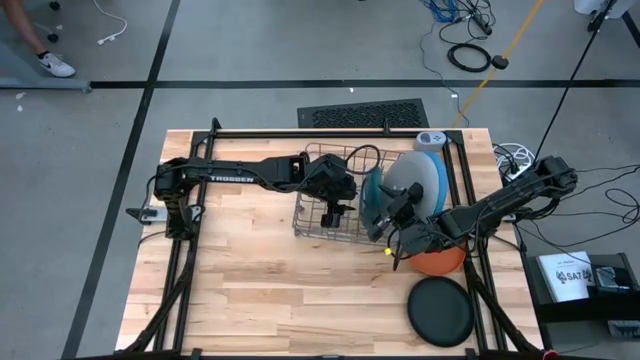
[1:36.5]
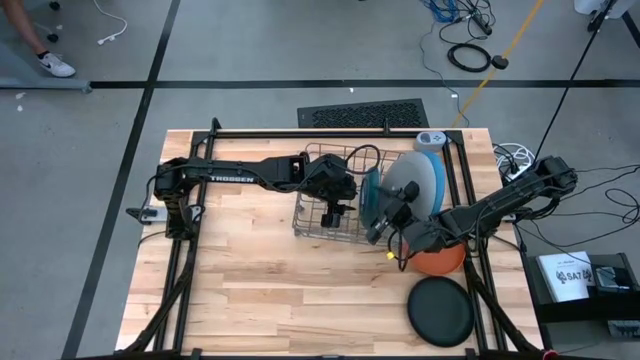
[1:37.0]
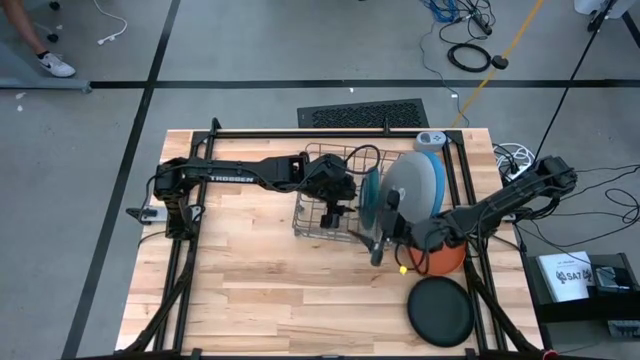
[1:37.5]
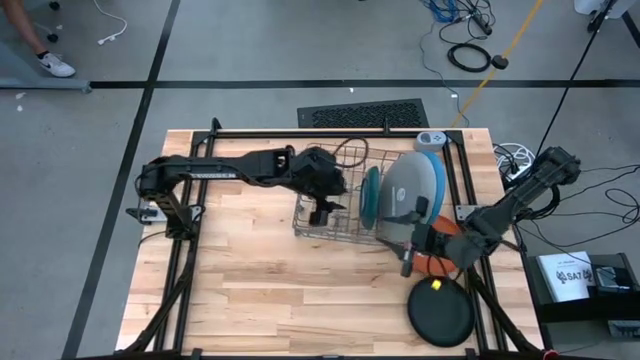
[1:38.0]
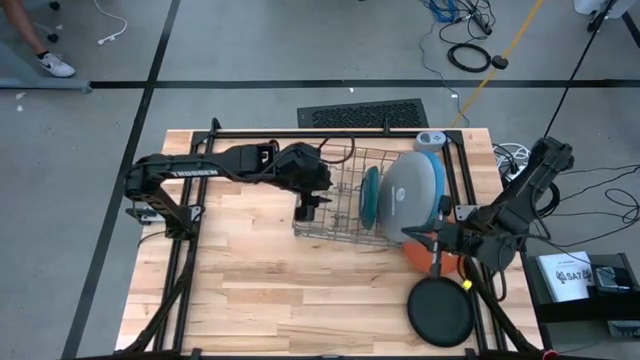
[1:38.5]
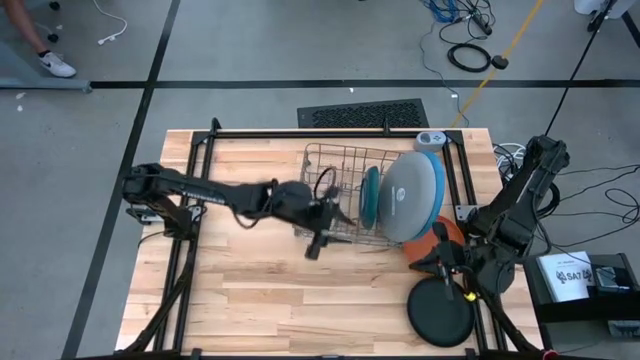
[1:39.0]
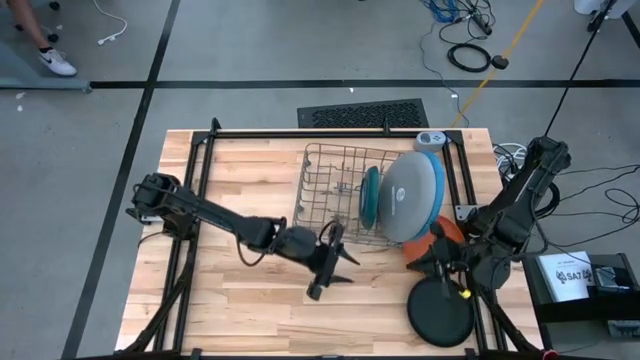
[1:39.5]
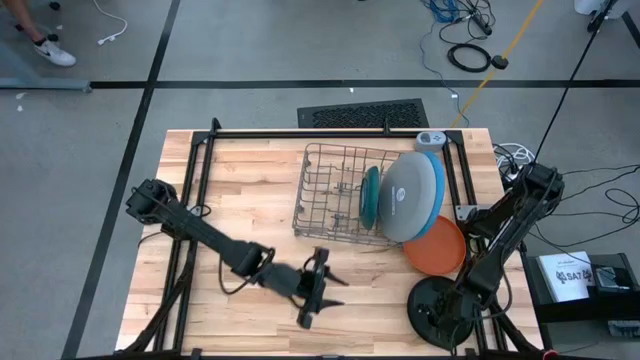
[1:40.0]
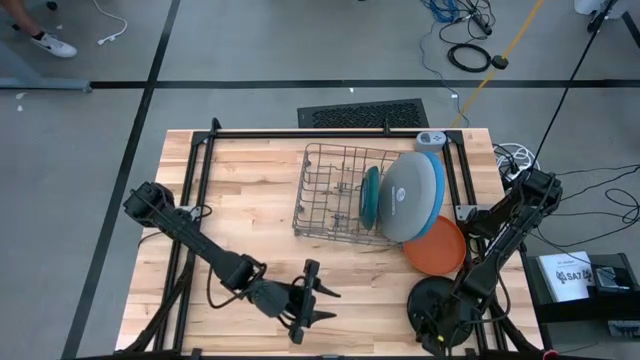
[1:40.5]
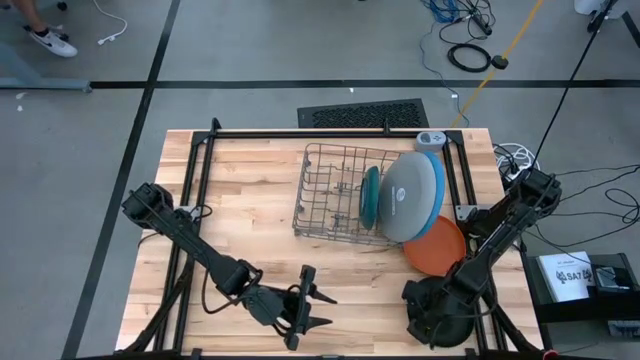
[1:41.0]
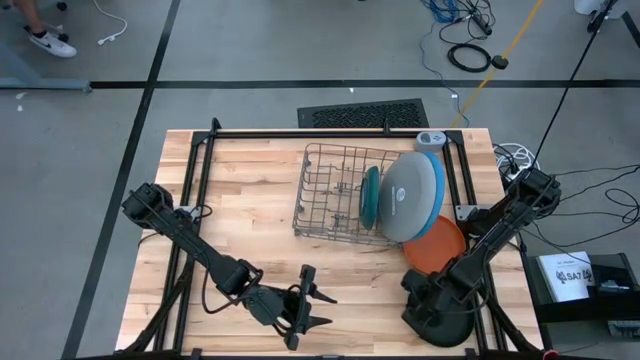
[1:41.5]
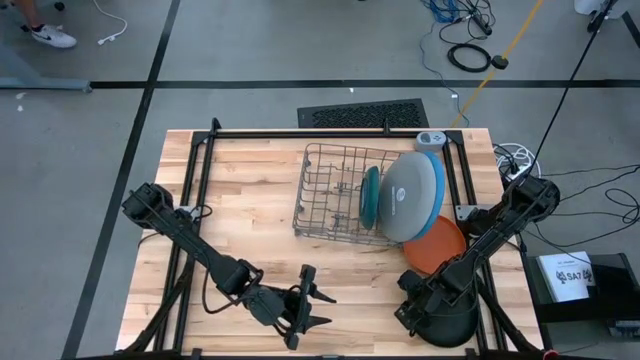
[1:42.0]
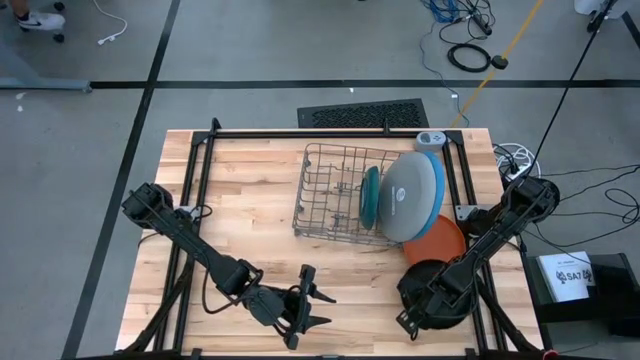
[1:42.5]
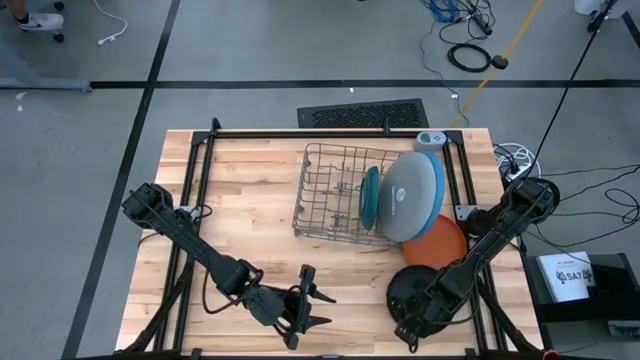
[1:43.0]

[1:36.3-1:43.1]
Task: Sort dishes
Put the black plate into the dish rack

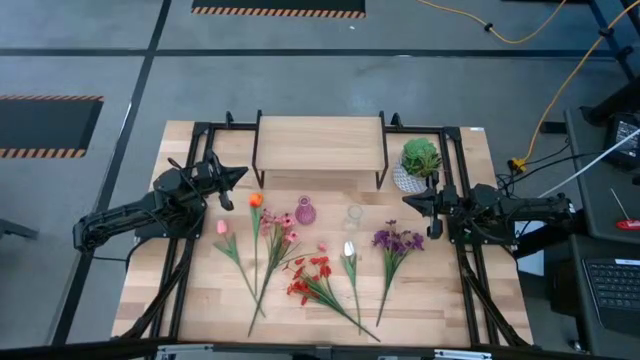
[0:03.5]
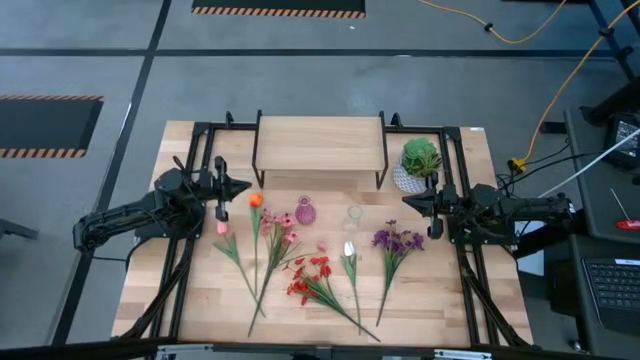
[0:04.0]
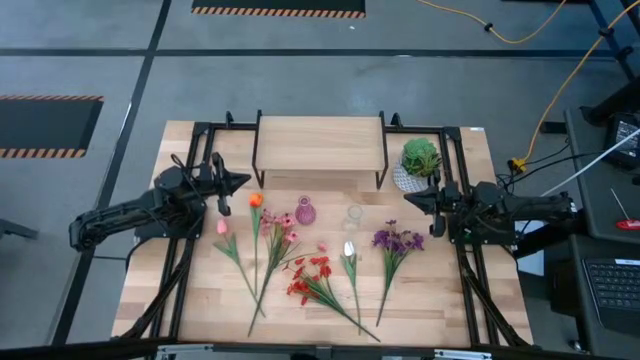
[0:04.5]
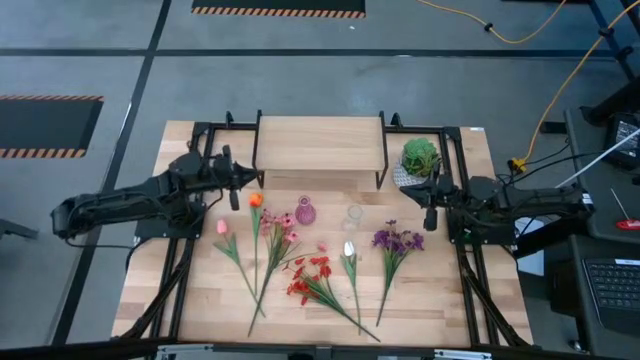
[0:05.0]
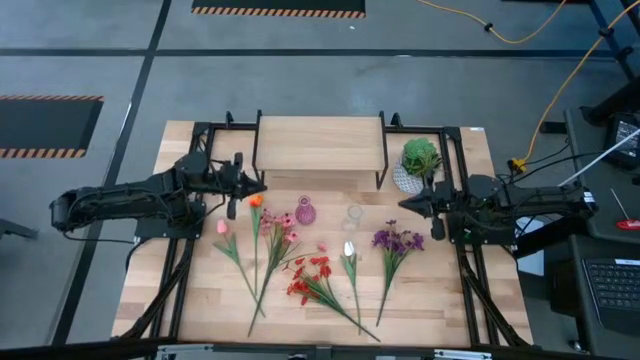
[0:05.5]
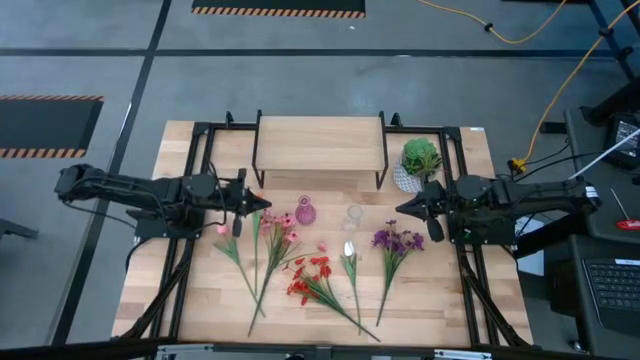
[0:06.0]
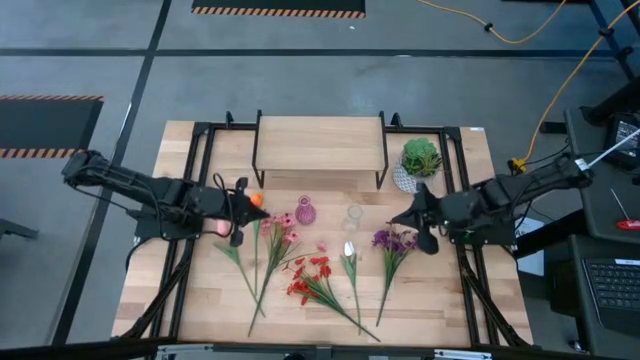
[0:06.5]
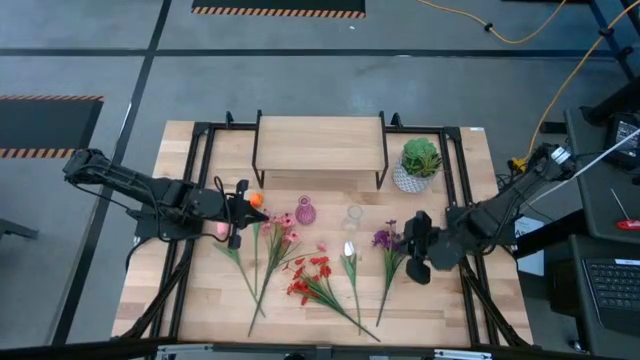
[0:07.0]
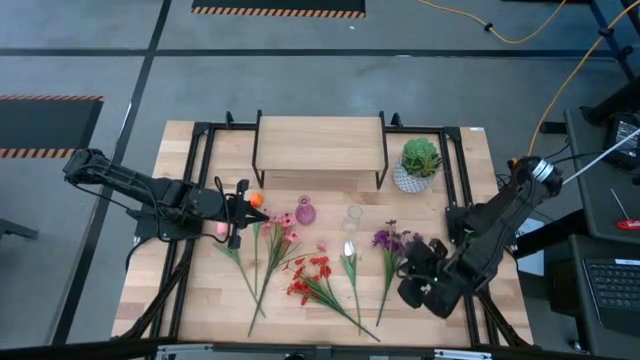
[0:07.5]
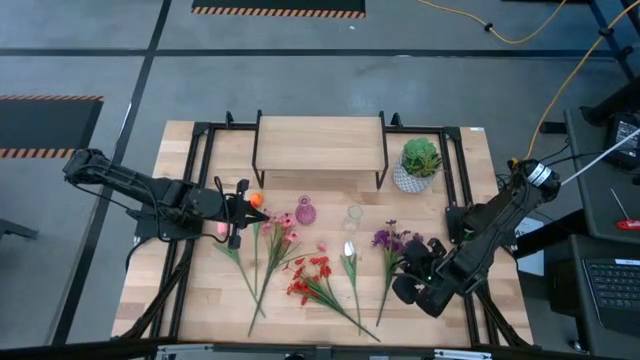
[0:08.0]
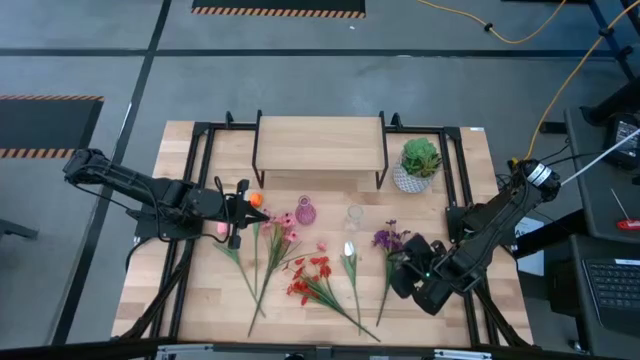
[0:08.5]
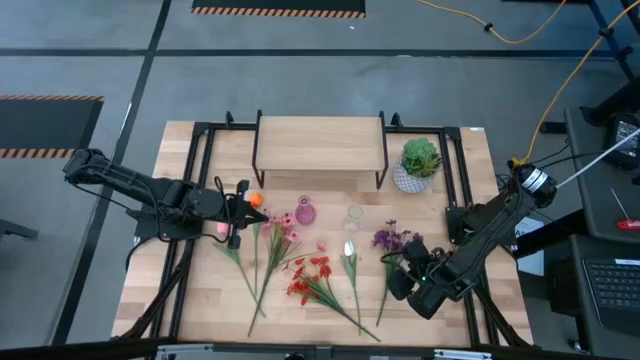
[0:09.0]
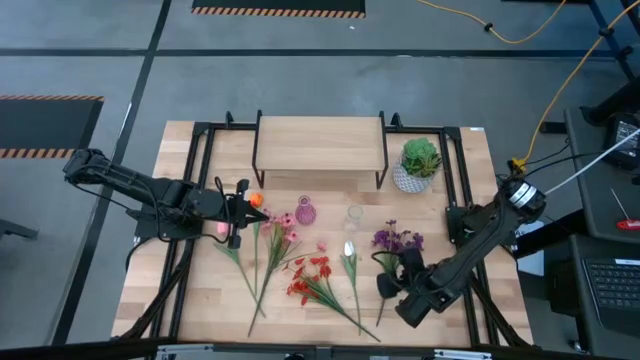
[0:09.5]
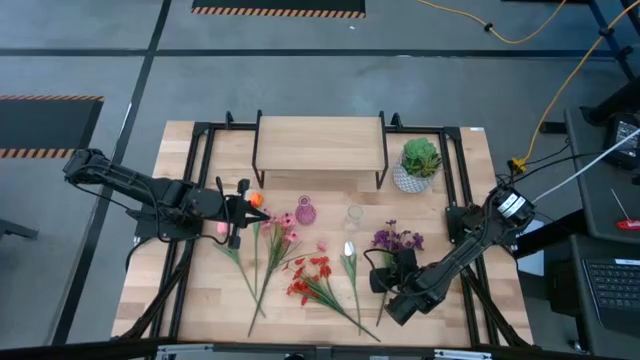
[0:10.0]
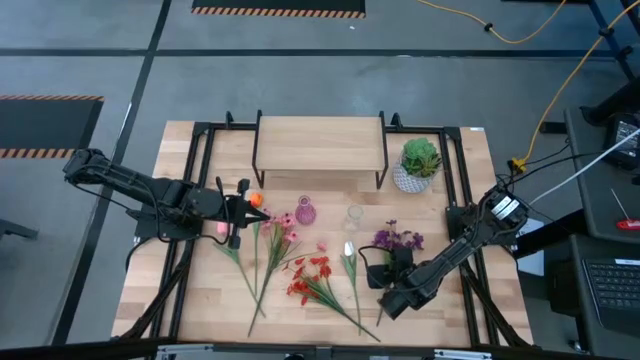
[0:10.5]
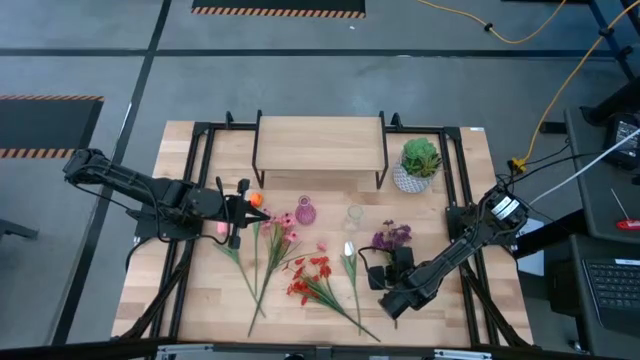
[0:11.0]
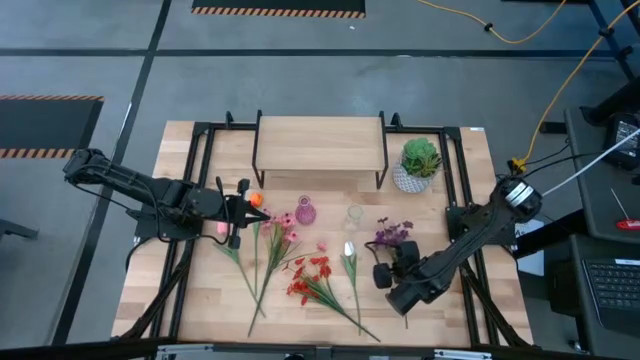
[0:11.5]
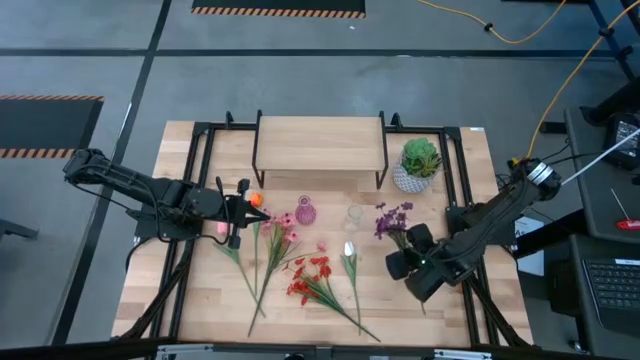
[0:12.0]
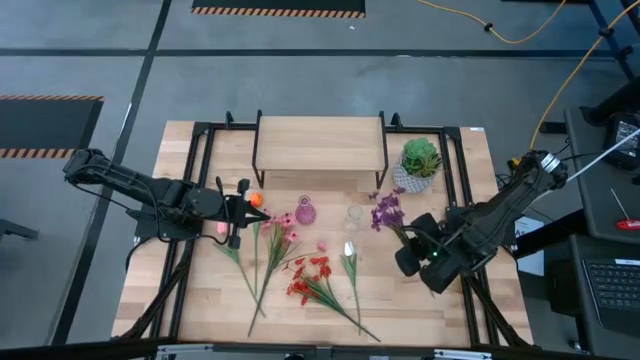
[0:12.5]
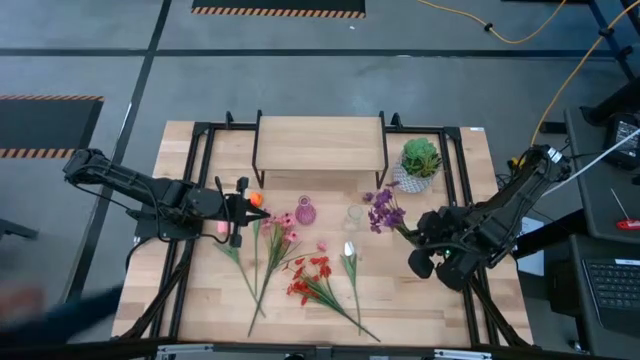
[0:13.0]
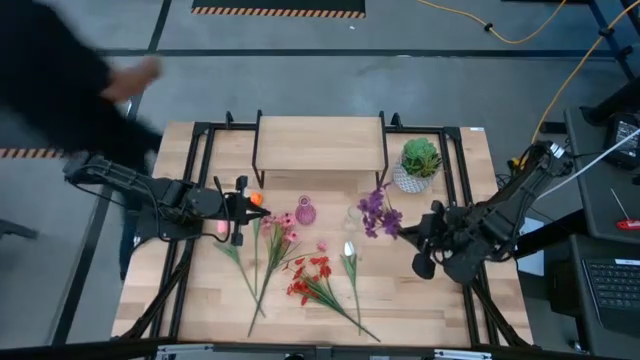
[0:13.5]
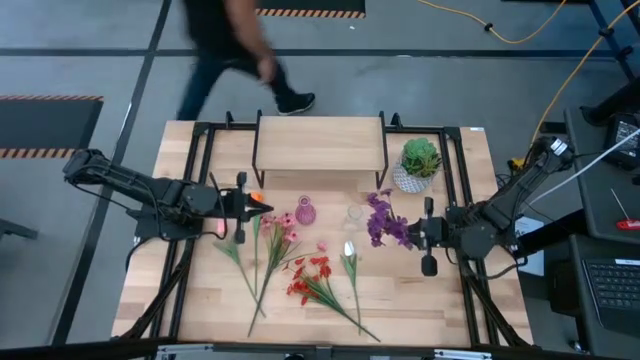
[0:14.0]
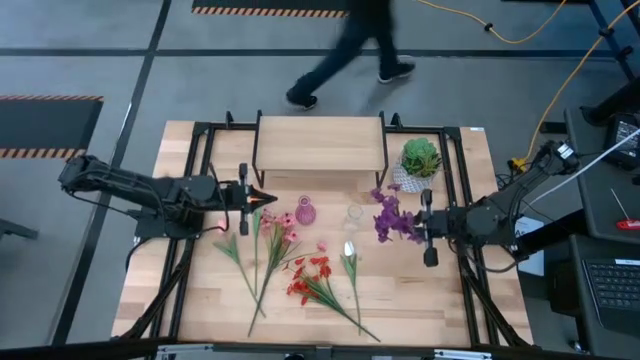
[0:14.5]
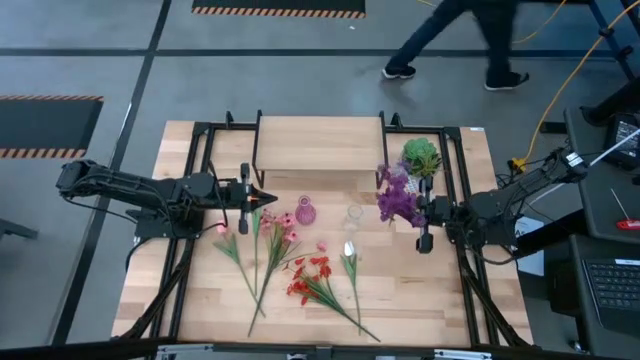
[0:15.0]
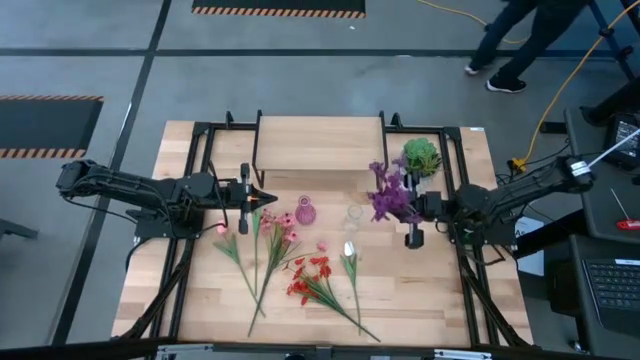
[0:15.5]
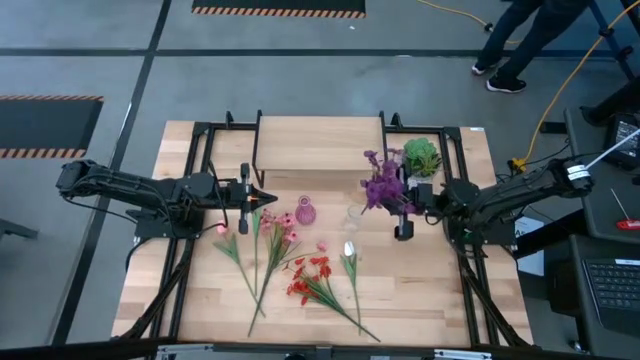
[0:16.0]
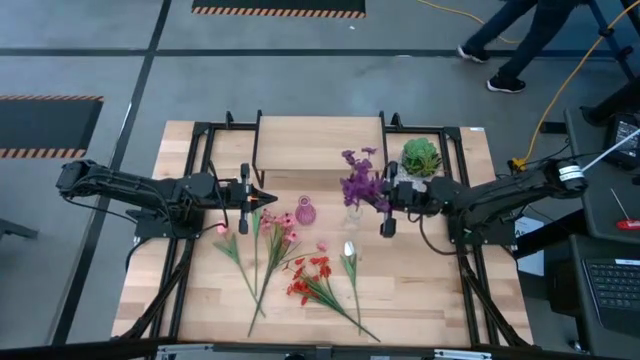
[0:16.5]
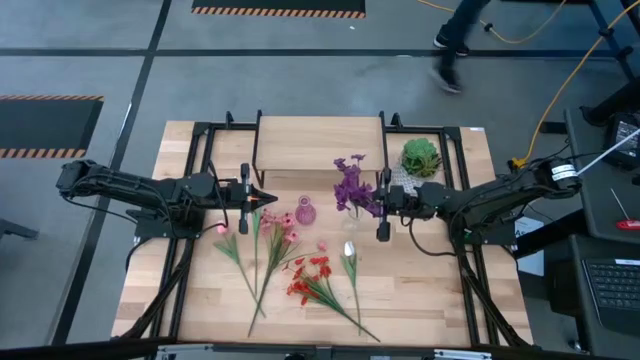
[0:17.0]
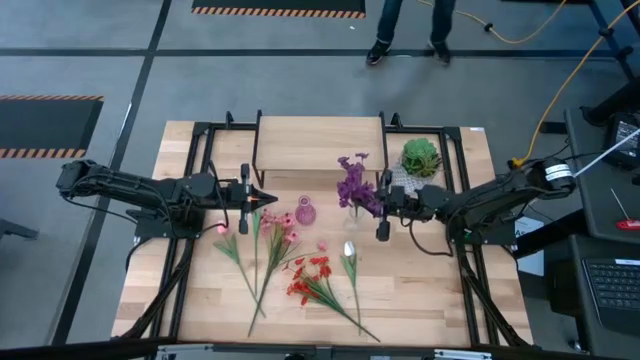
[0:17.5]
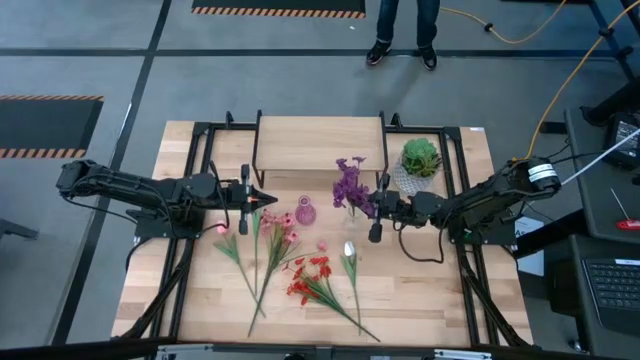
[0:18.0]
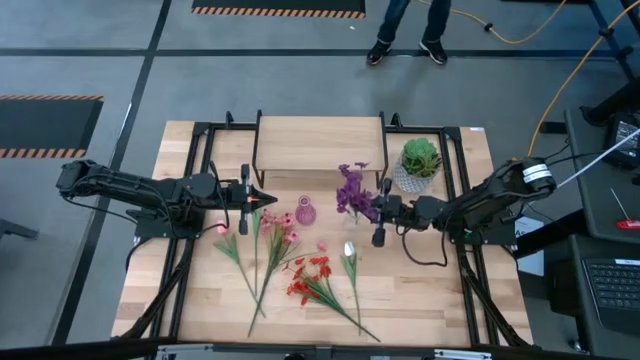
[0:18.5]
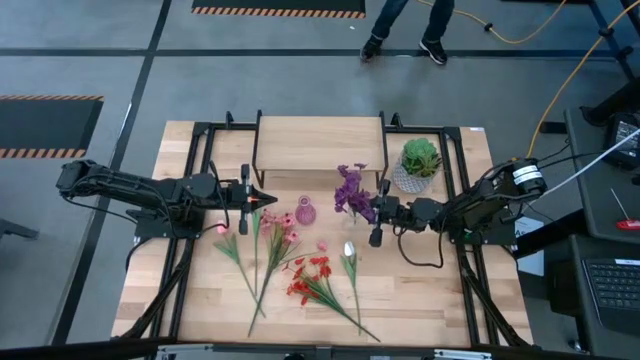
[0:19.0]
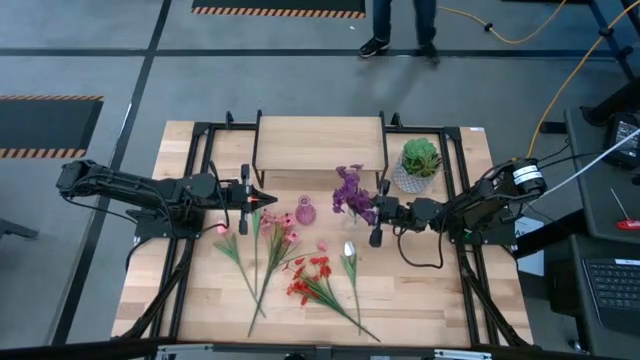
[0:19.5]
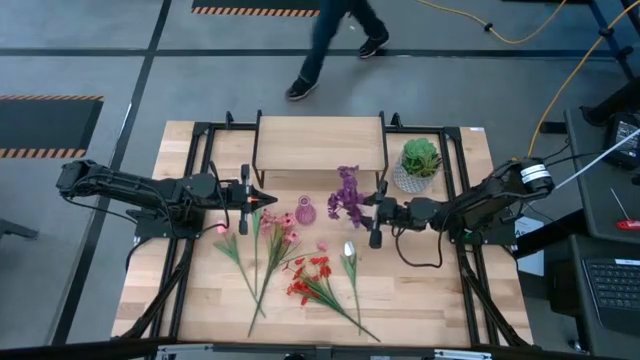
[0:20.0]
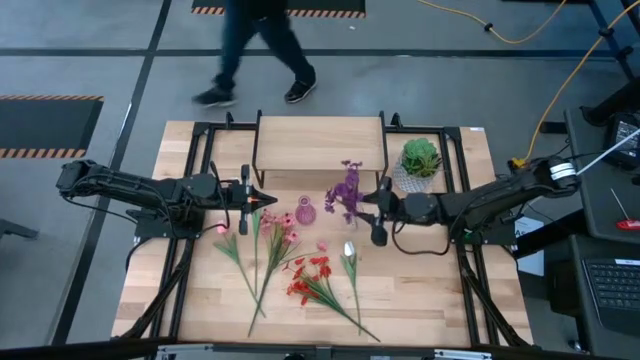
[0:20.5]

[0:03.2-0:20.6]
Task: Pick and place flowers into a vace then onto a shelf
Put the purple flowers into the transparent vase
